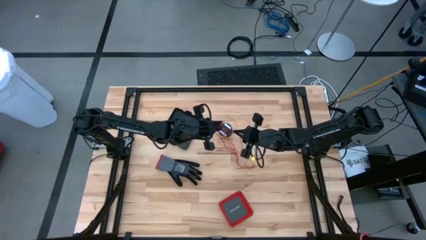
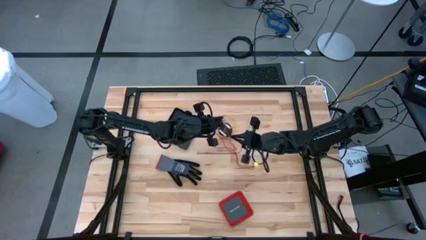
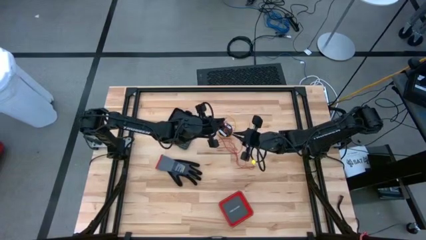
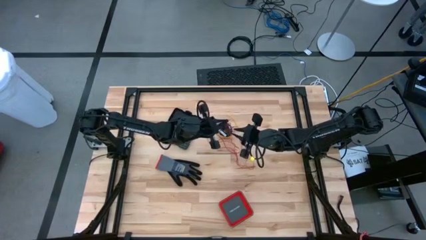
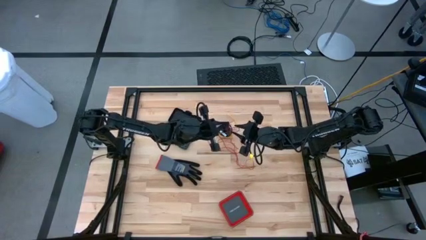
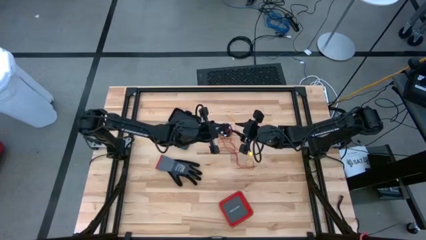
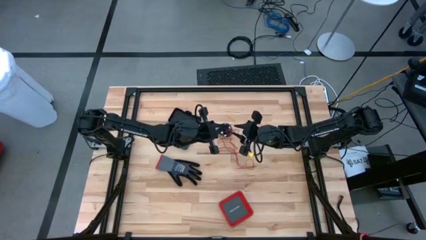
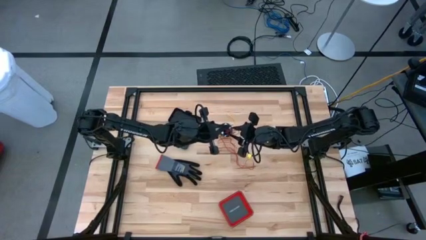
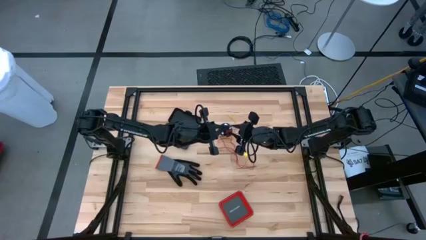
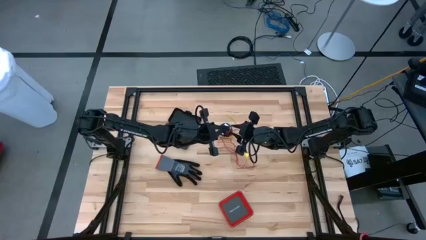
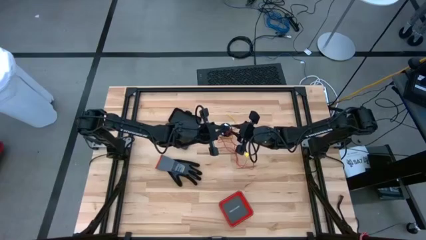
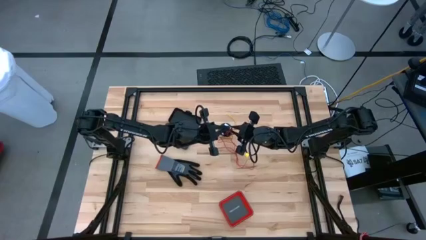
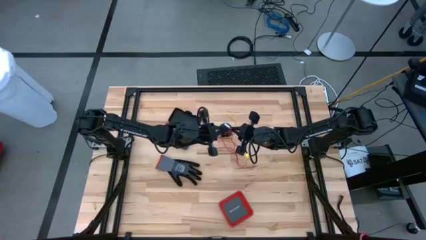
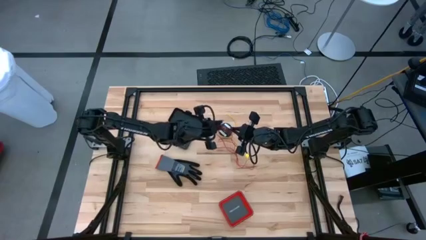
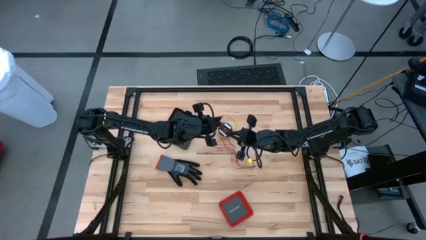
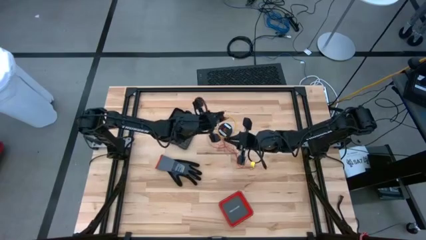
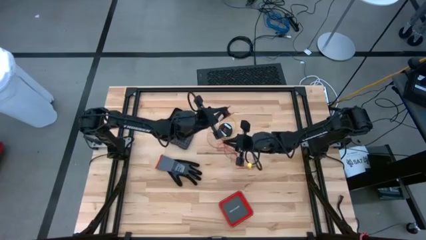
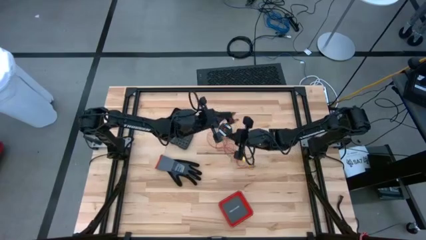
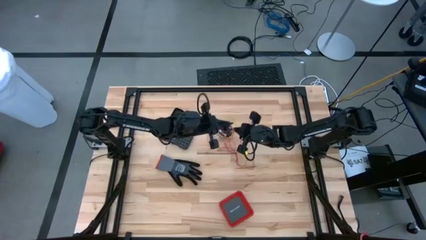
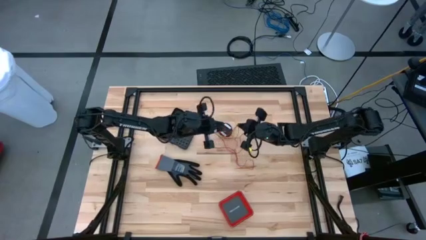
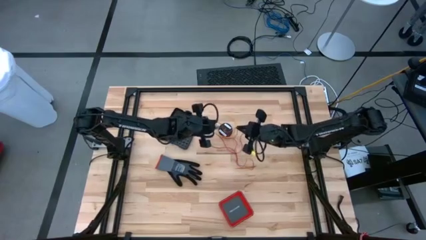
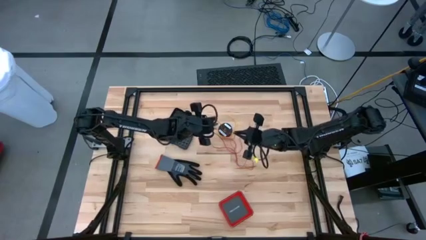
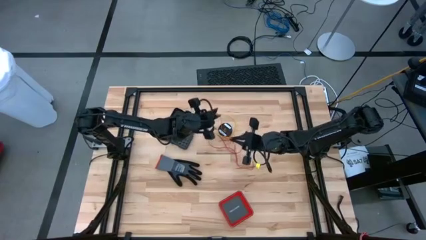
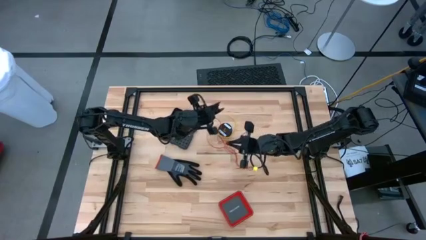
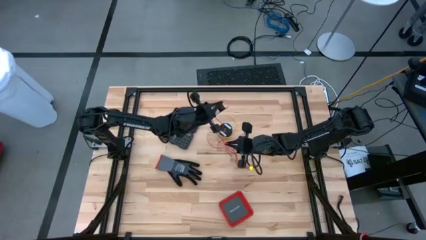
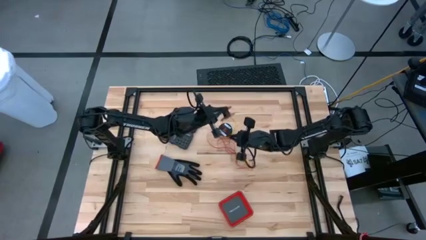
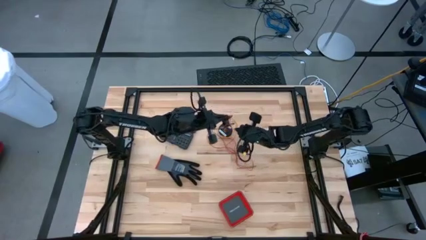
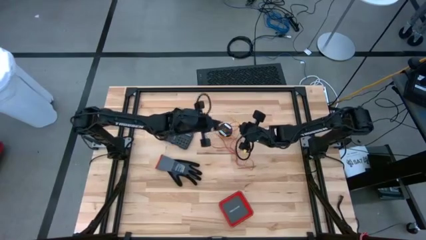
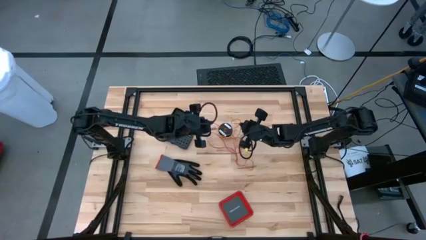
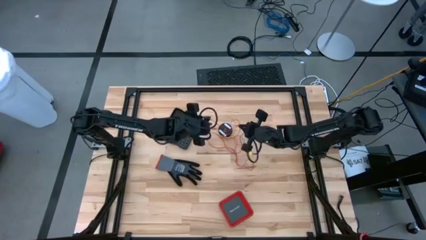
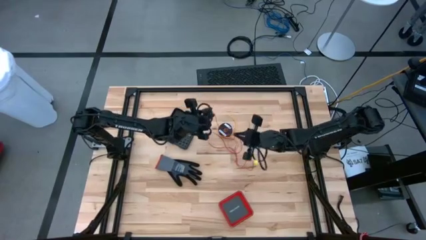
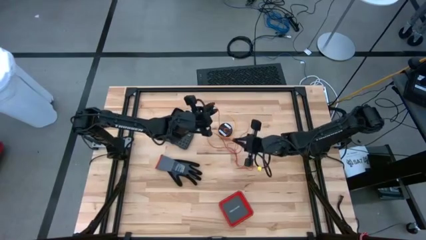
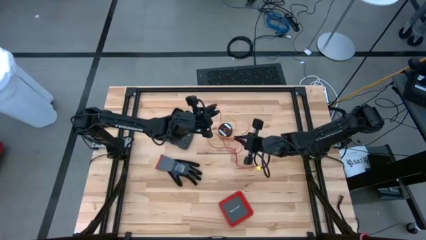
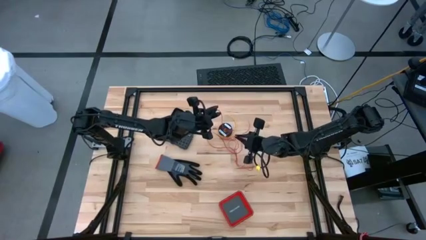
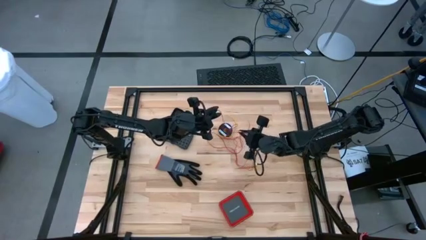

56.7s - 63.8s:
Task: Coil cords
Uncoil the red wire from the spool
